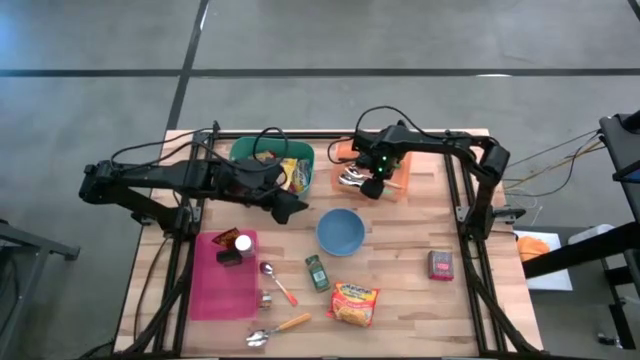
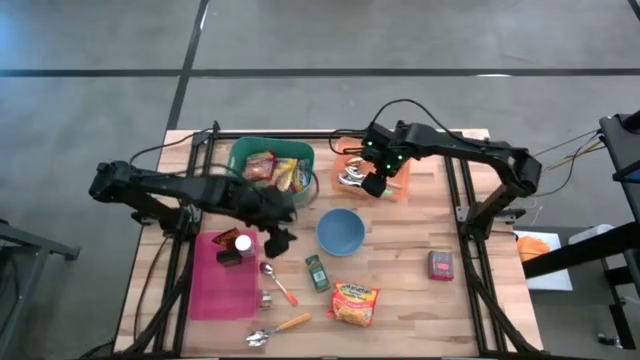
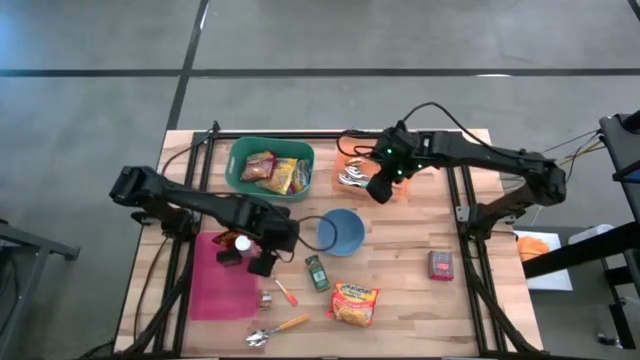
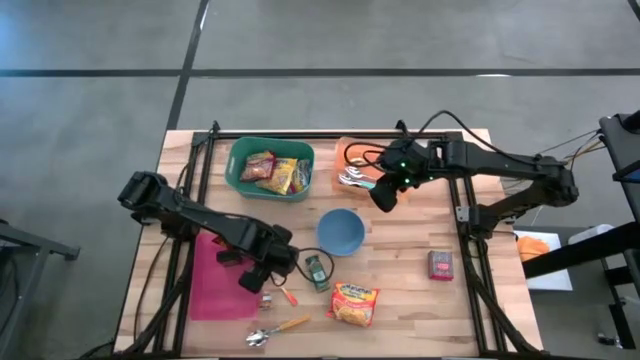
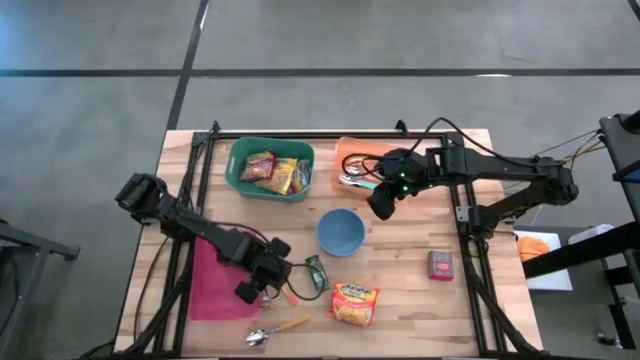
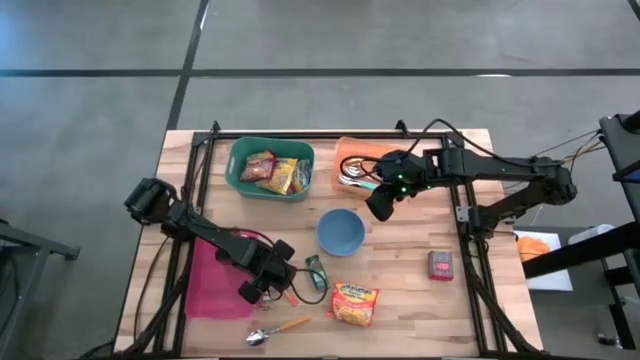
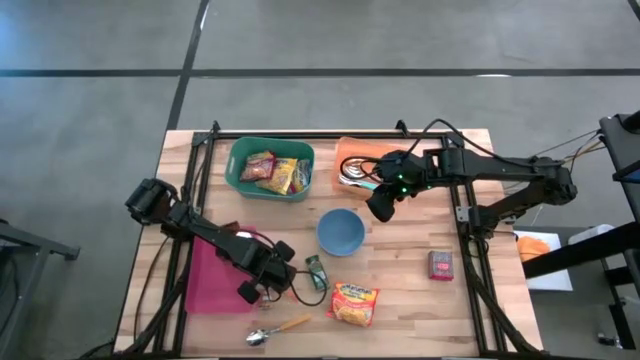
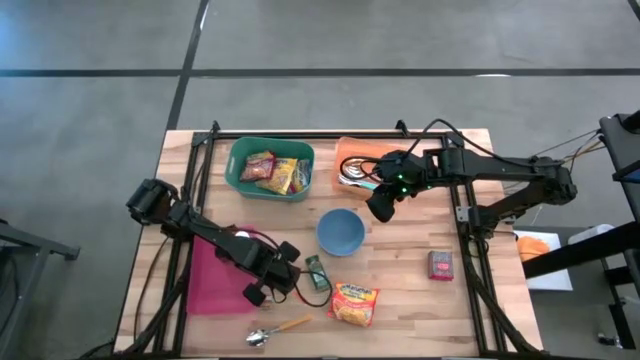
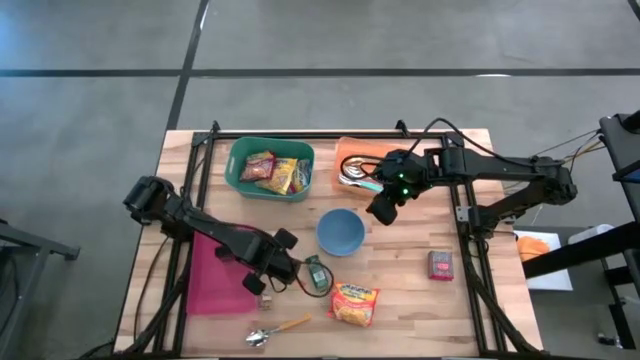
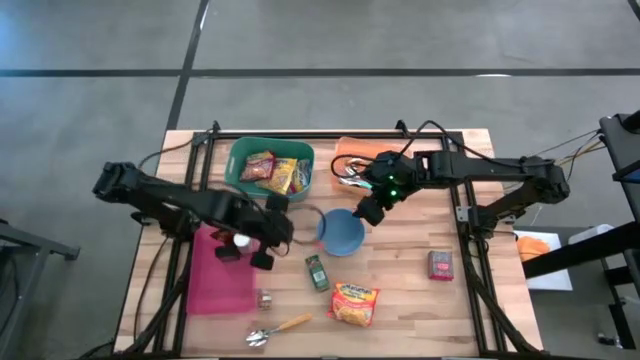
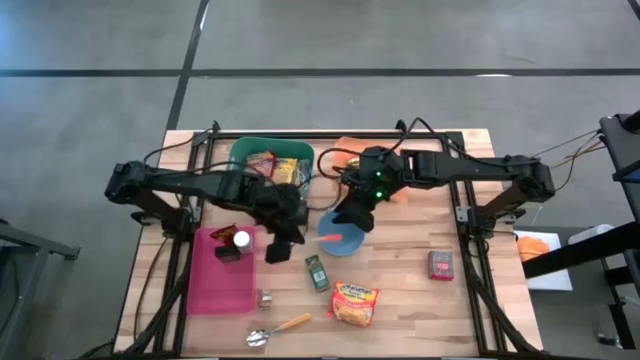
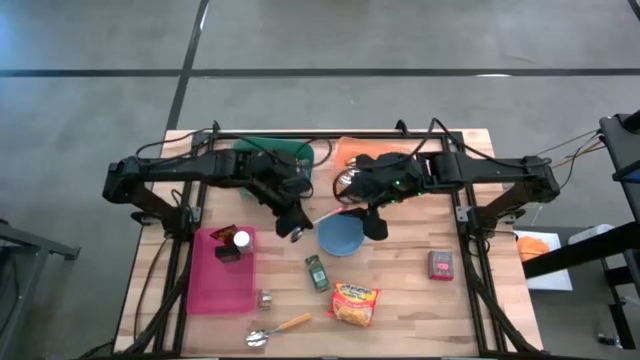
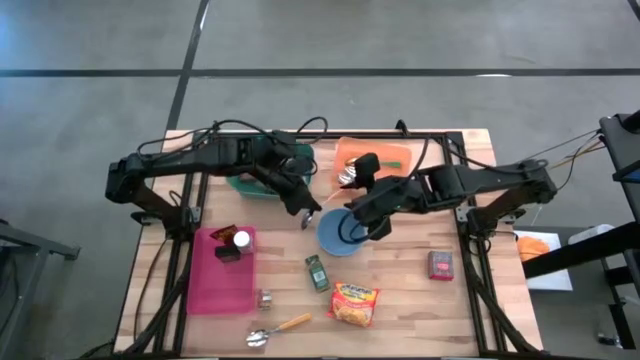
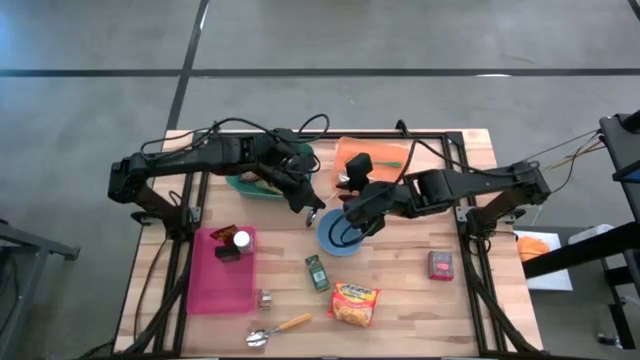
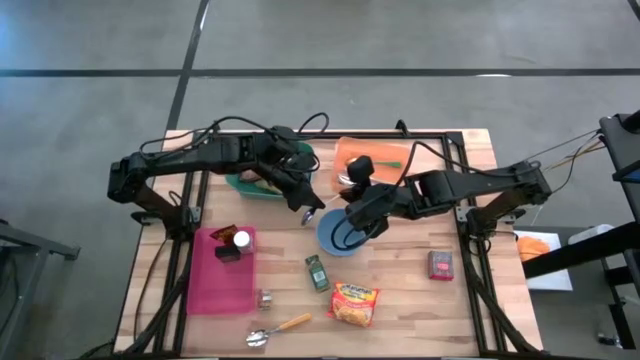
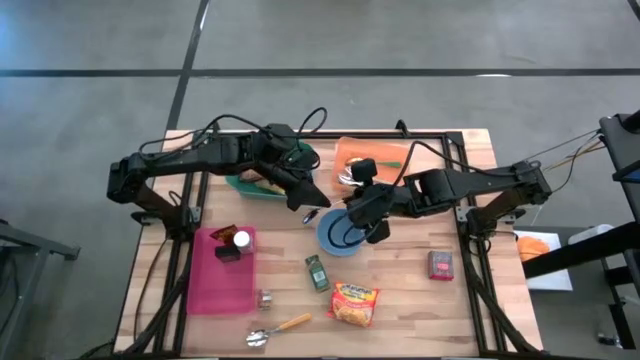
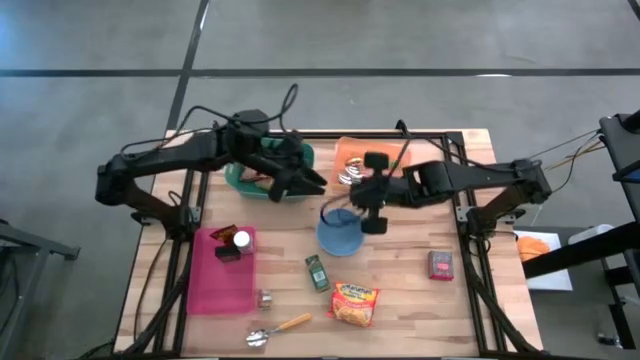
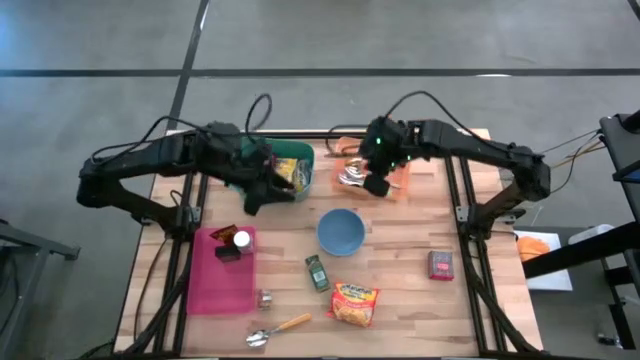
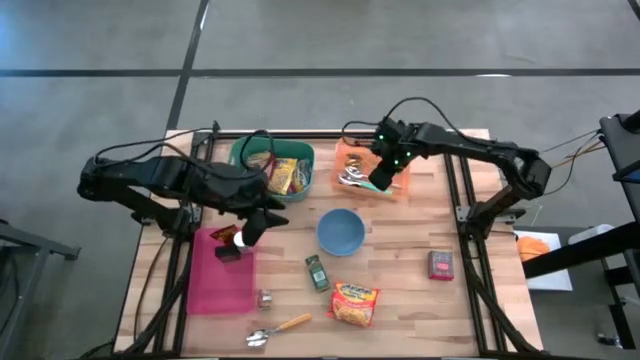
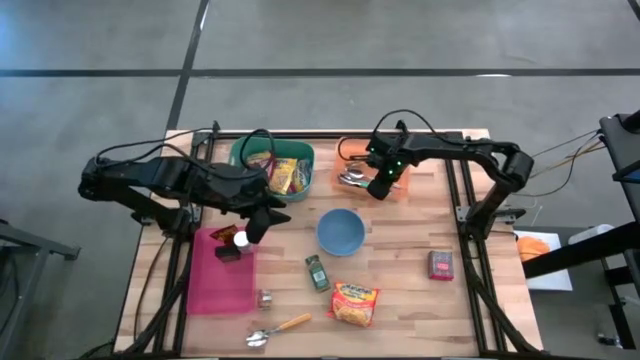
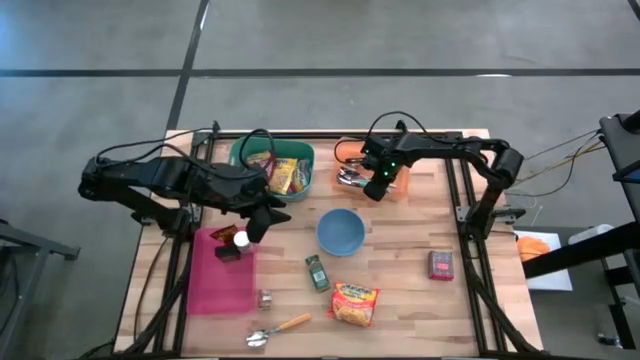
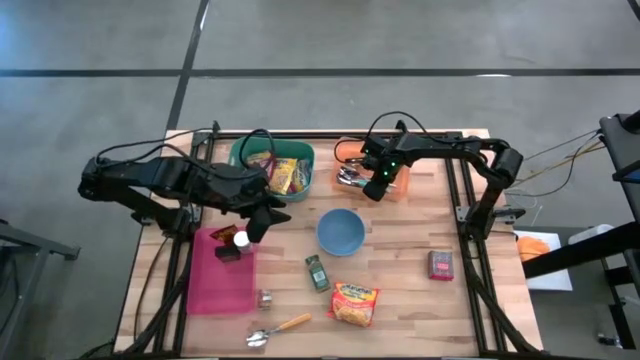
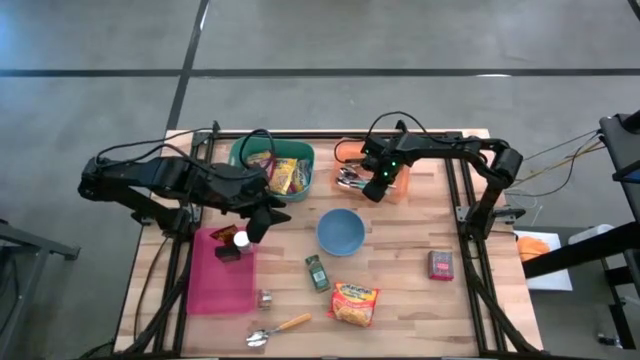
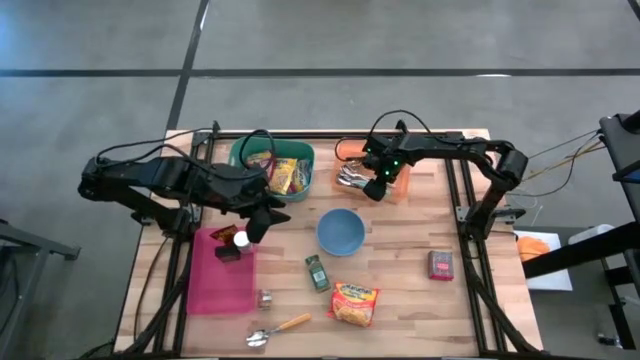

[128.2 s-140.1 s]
Put the orange spoon into the orange bin

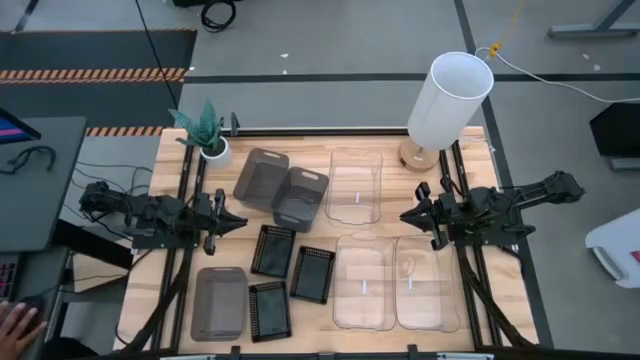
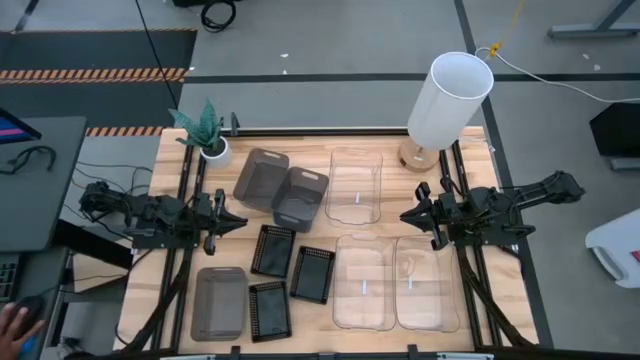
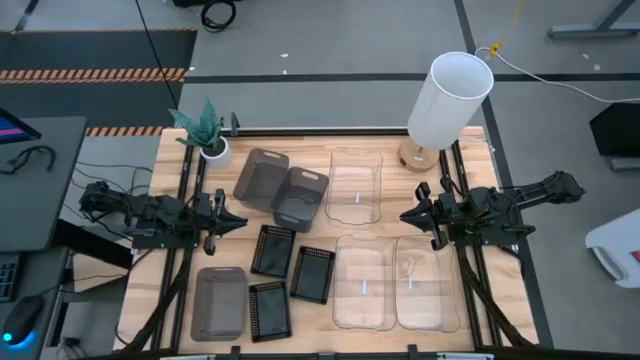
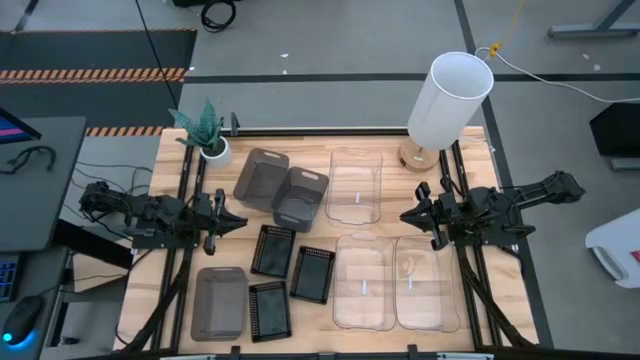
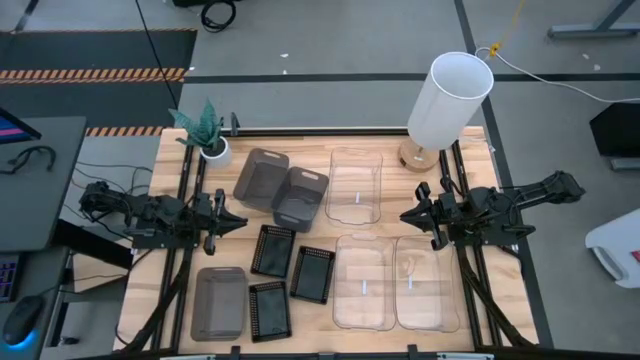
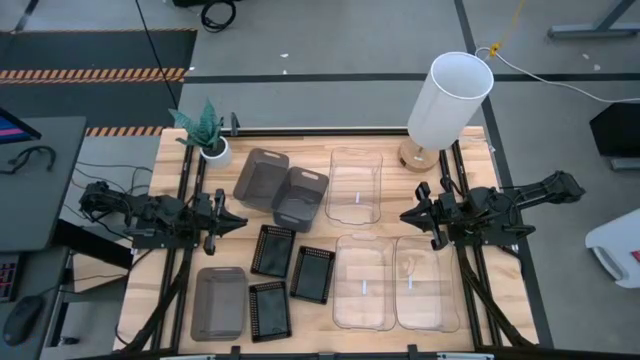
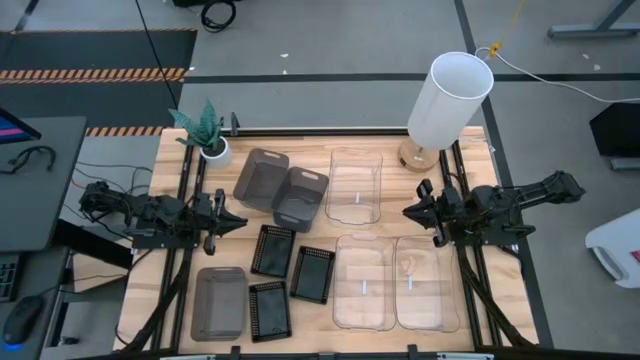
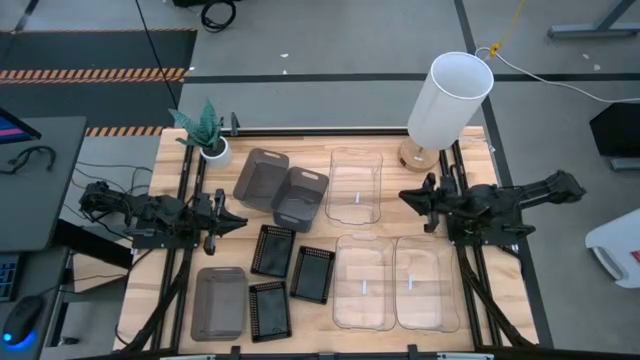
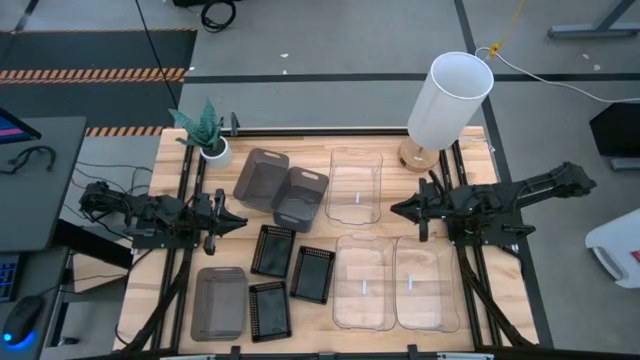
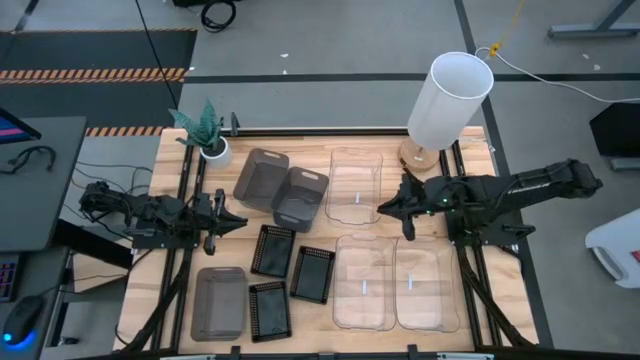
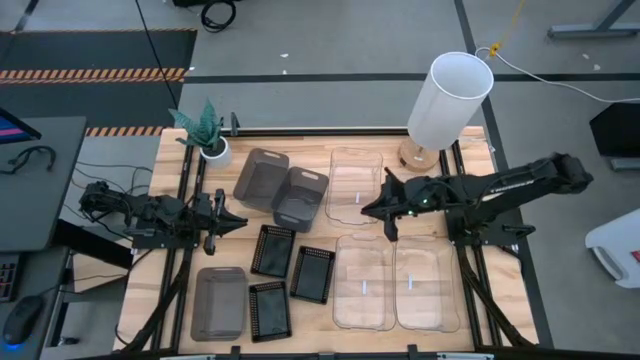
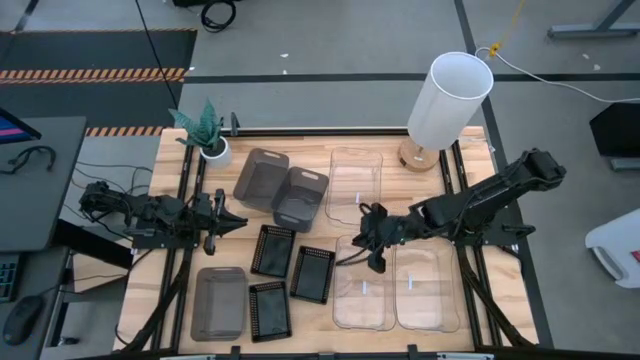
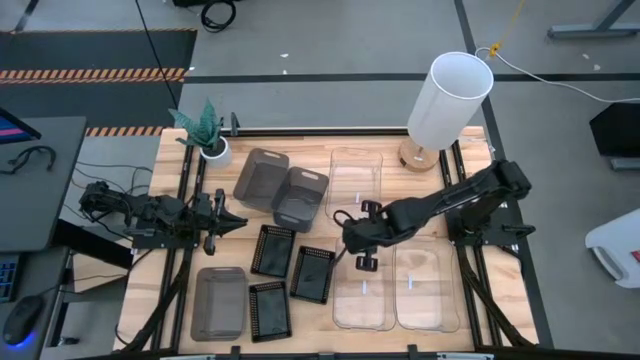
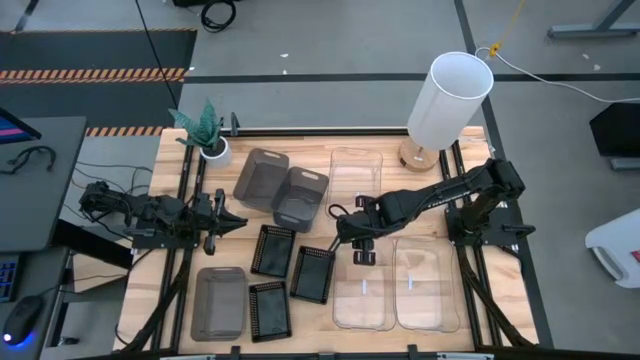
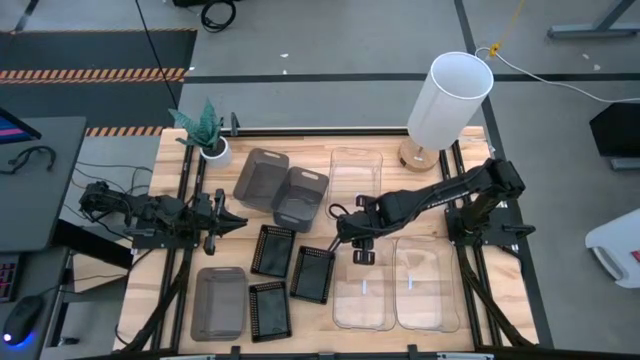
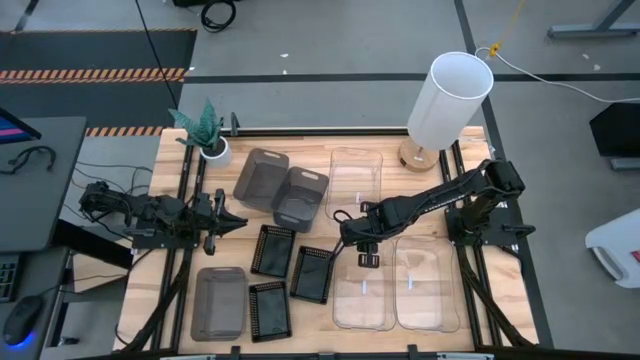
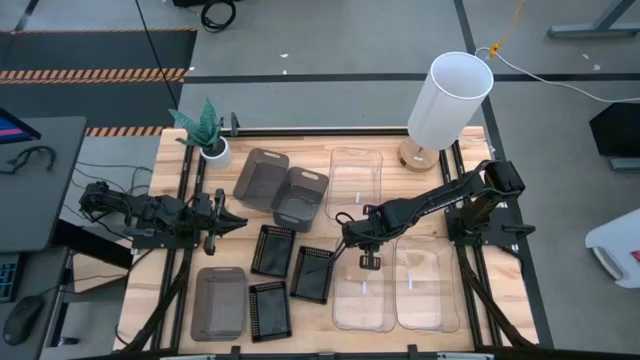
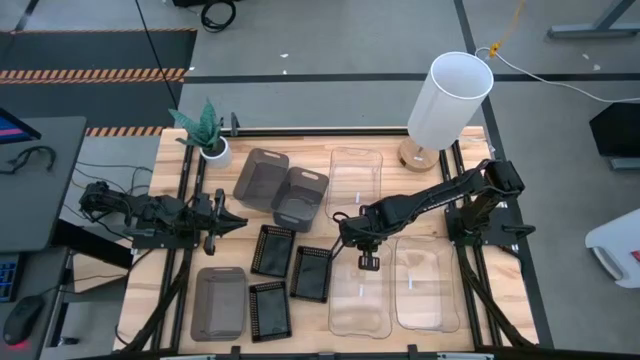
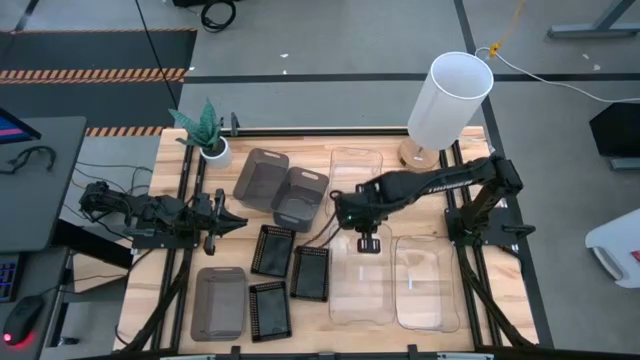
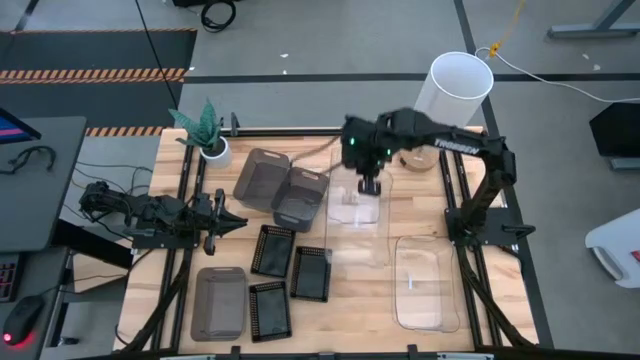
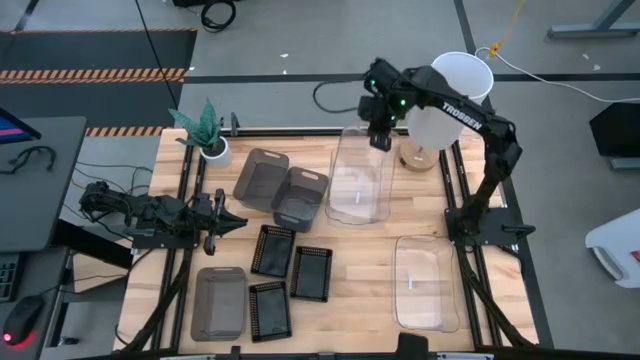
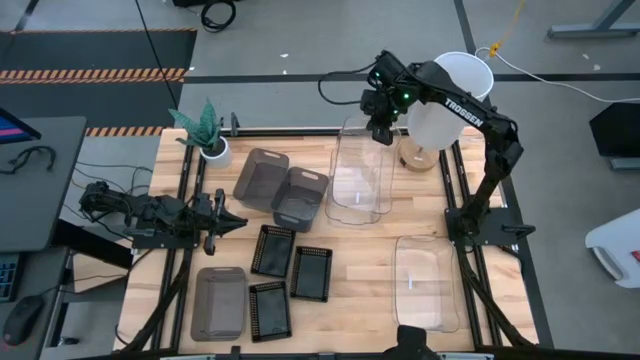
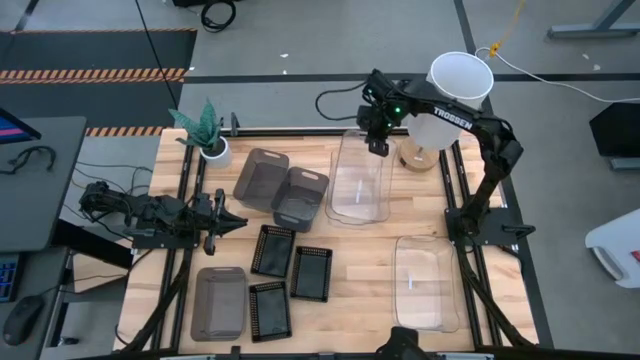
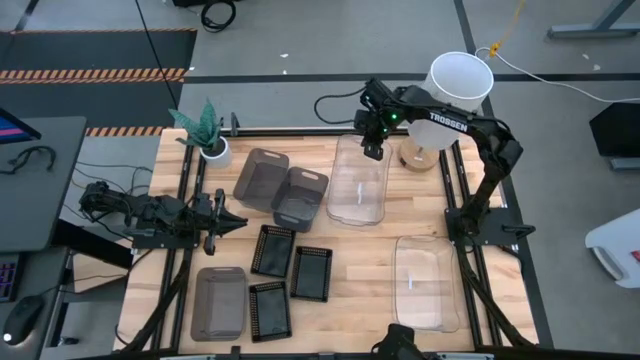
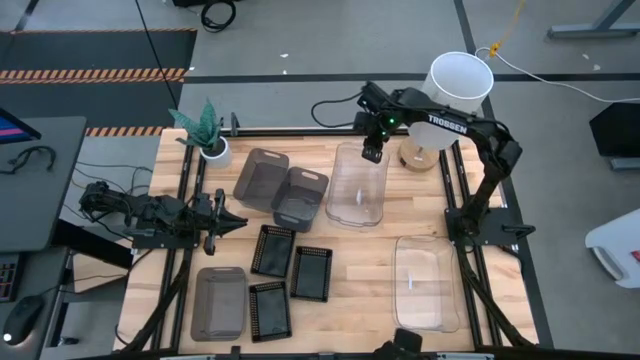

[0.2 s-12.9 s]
Stack the bottom left transparent bin on the top transparent bin
